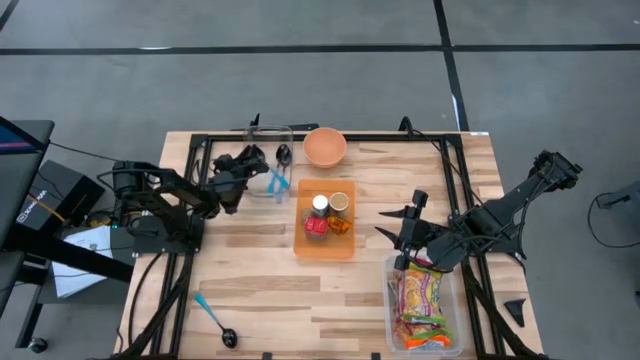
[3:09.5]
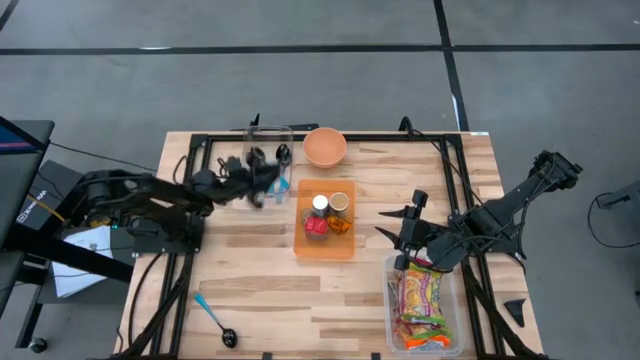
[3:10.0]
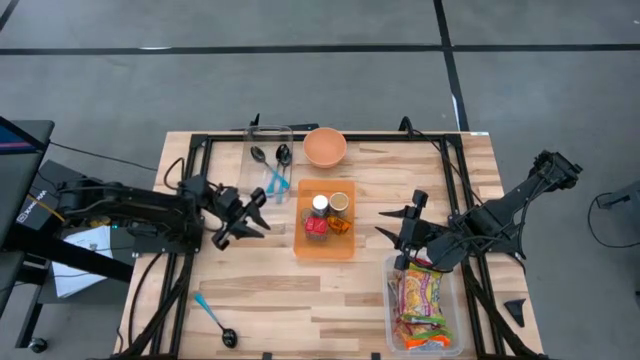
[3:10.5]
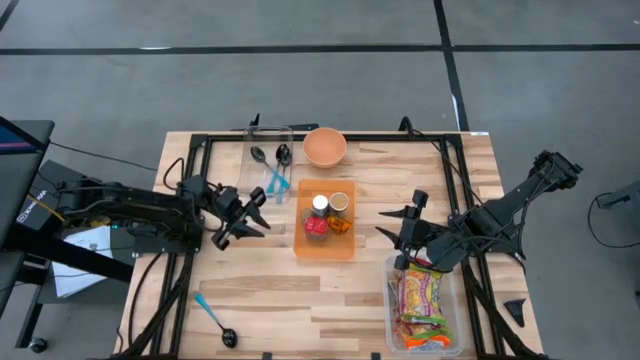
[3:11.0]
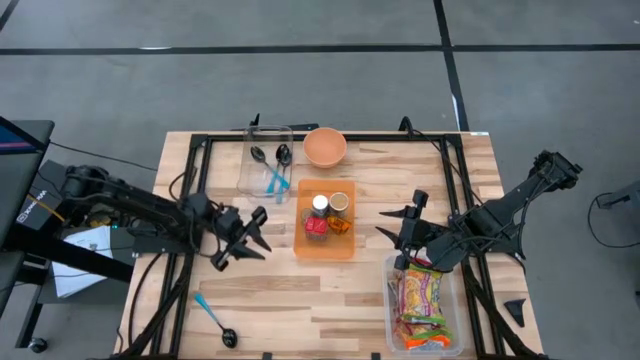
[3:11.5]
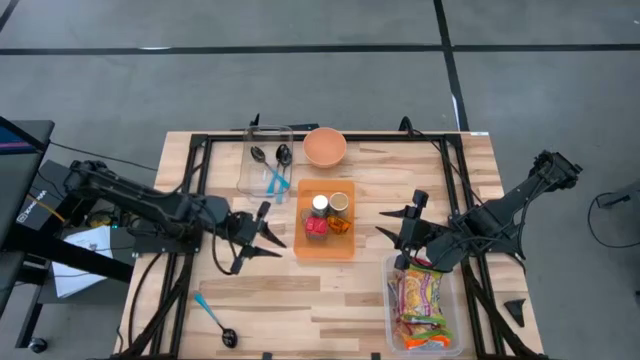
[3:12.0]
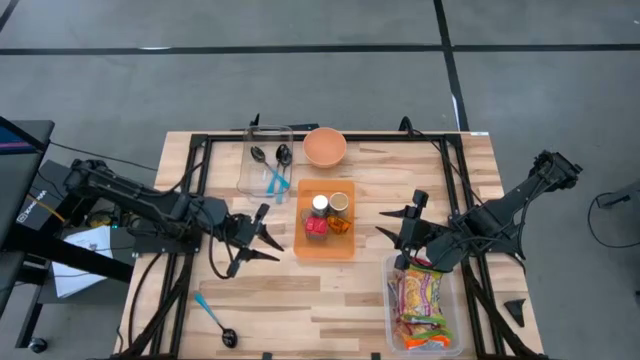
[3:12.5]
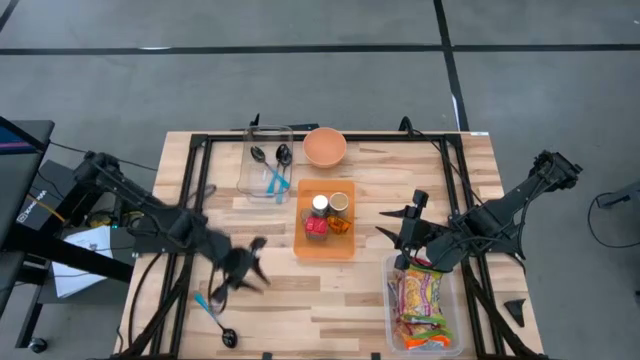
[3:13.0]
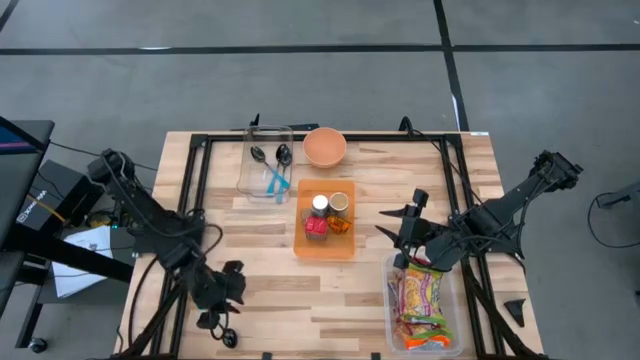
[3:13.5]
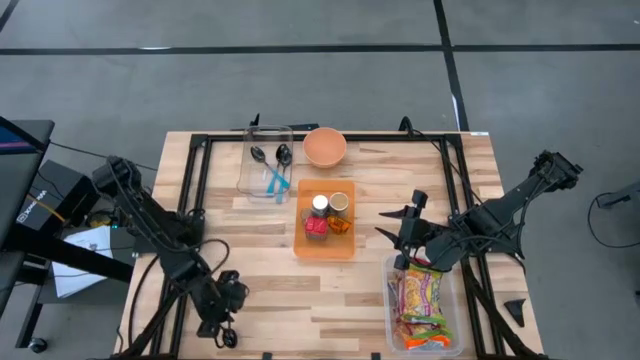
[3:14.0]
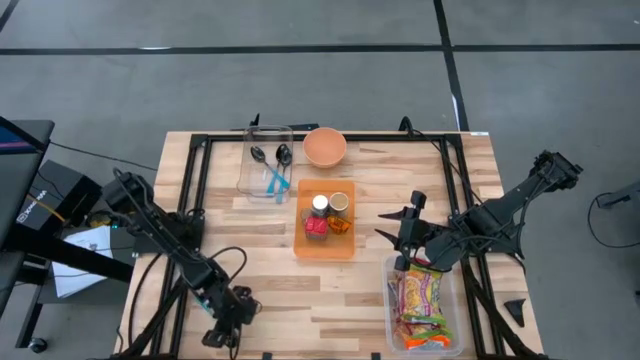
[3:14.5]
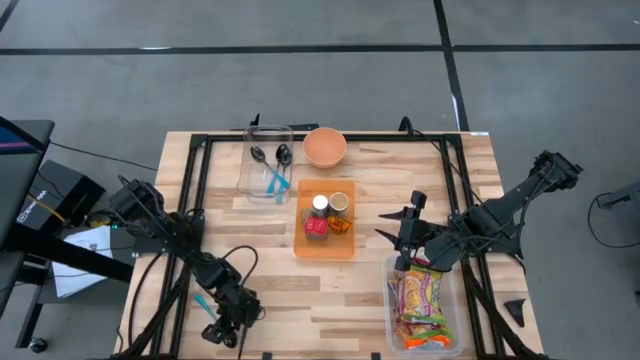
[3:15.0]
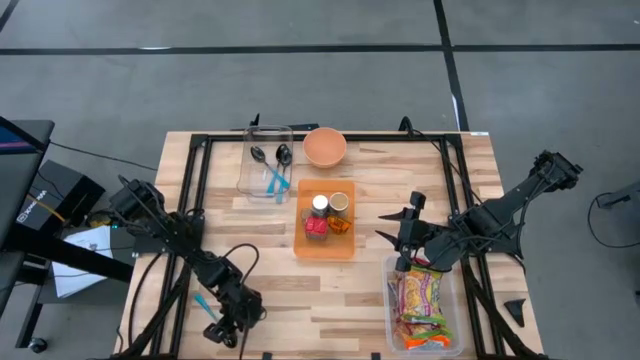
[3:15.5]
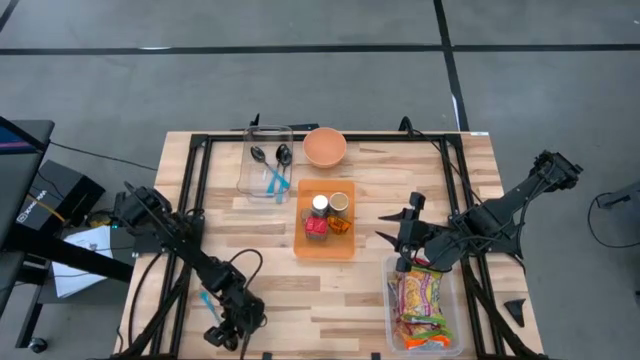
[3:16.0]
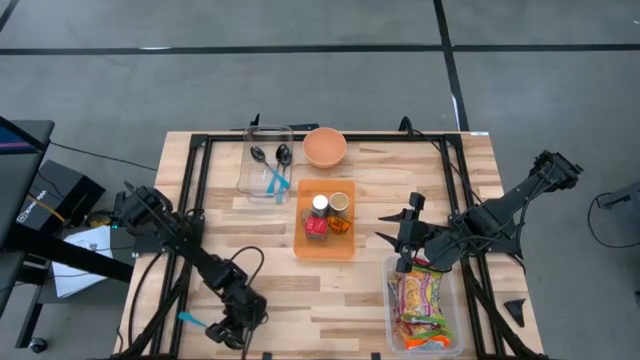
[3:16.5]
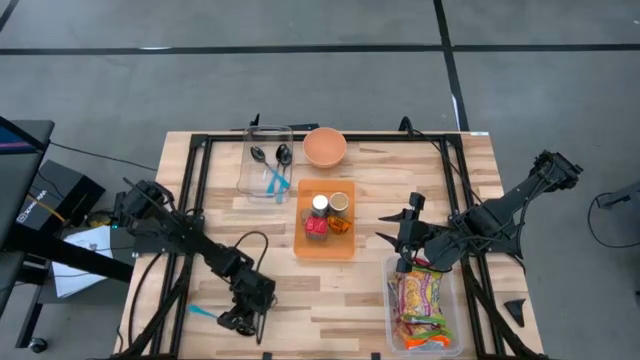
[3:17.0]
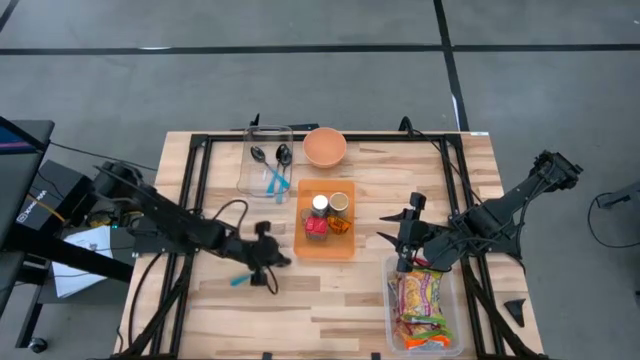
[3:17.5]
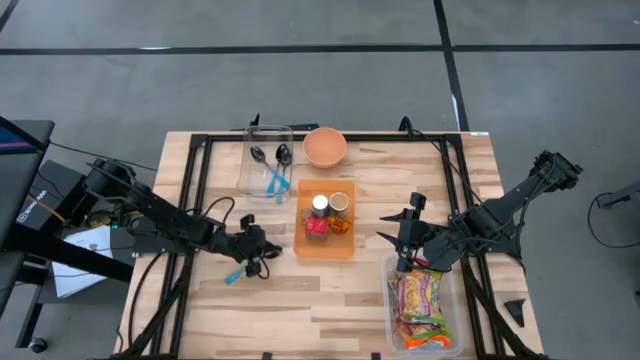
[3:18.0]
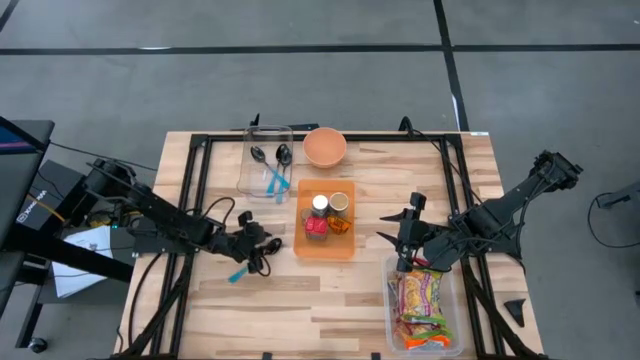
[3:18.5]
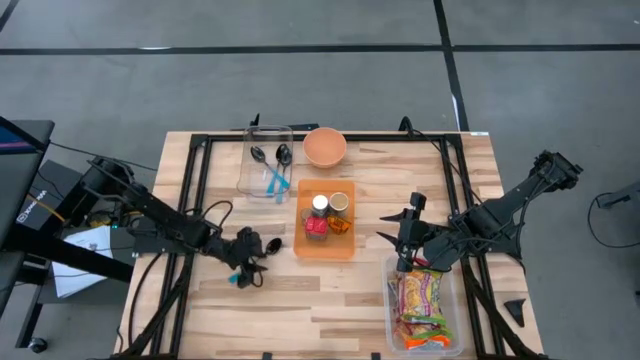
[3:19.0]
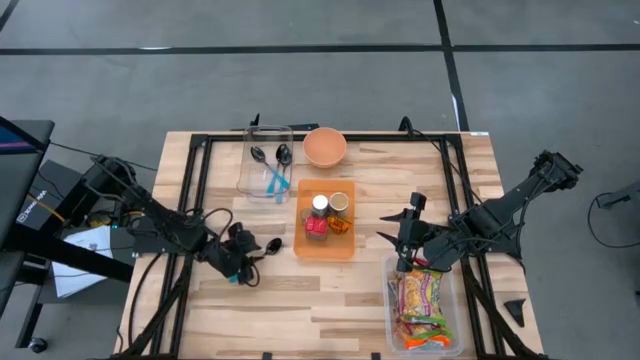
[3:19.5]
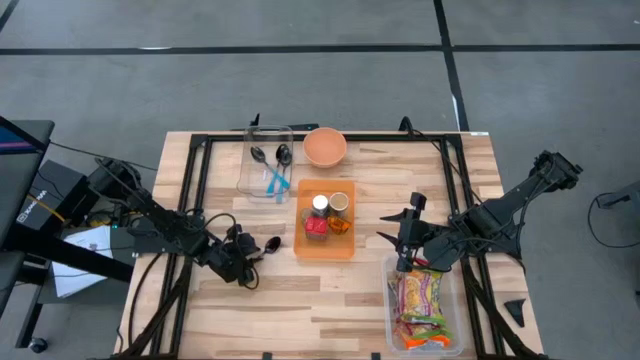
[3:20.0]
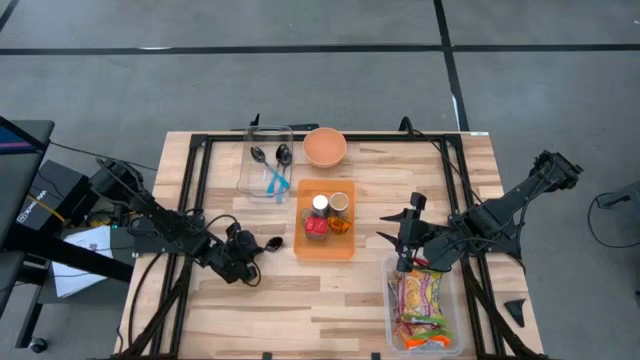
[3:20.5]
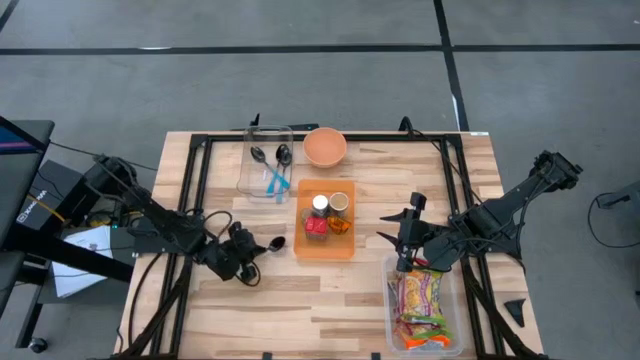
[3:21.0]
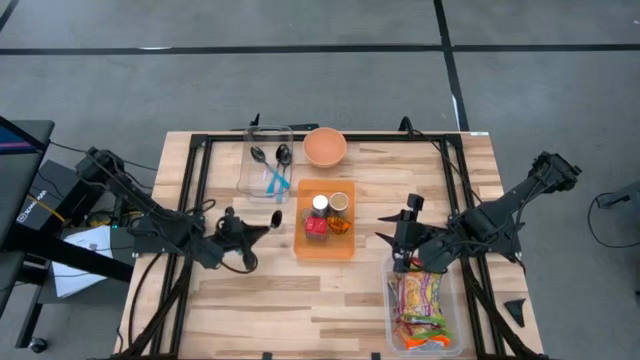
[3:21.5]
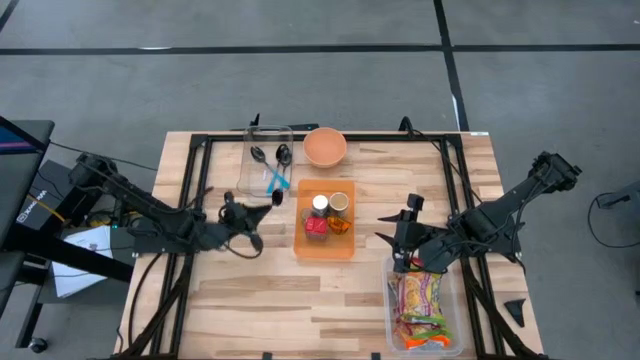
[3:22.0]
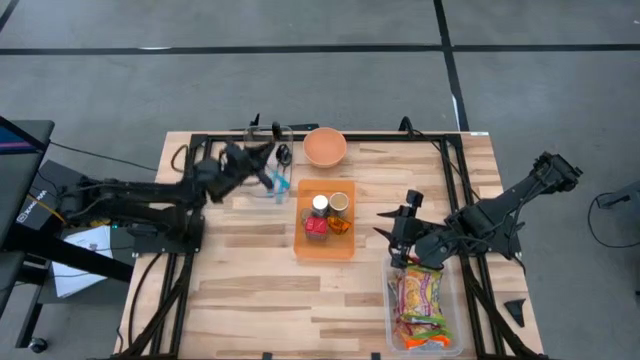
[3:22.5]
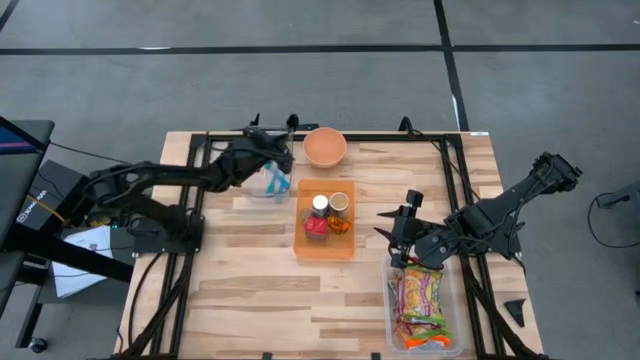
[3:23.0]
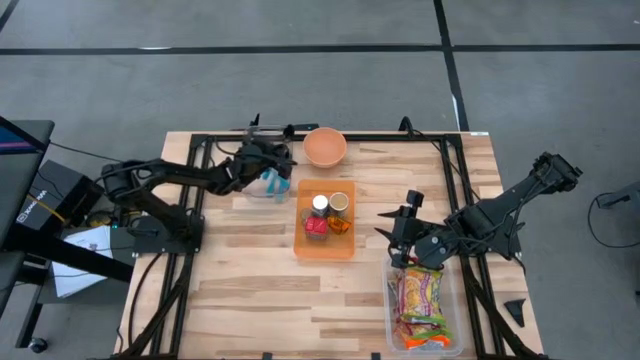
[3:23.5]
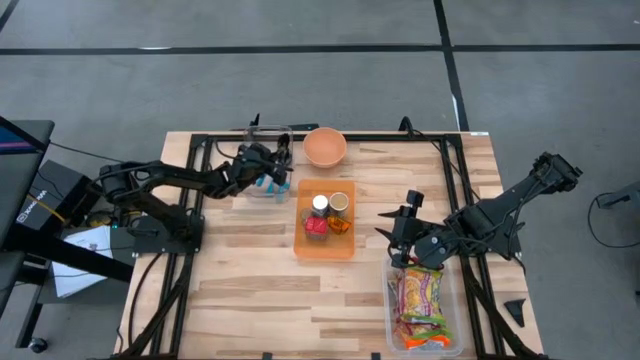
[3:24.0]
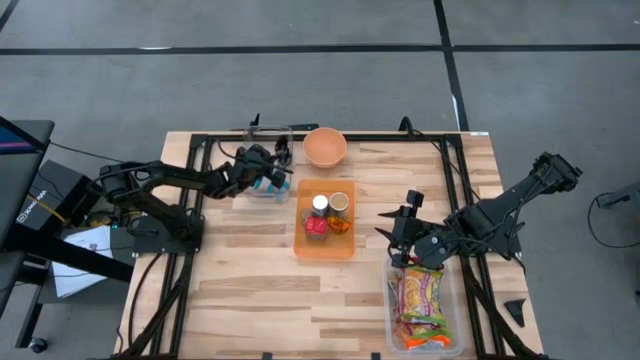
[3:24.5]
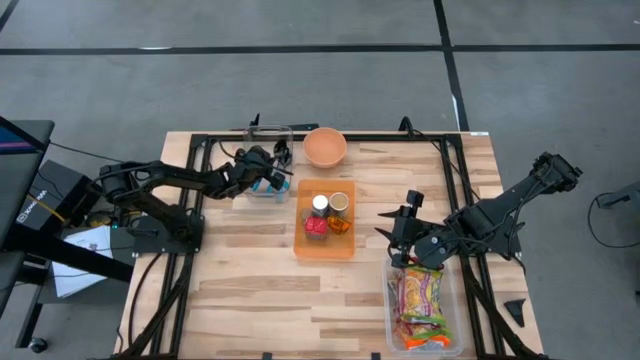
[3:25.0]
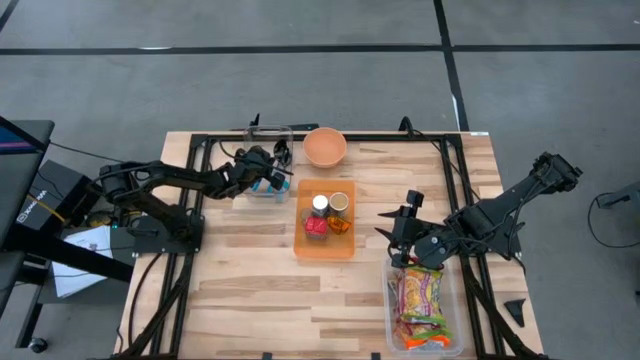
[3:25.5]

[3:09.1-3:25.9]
Task: Pick & Place Food Item
Put the blue spoon into the transparent bin
